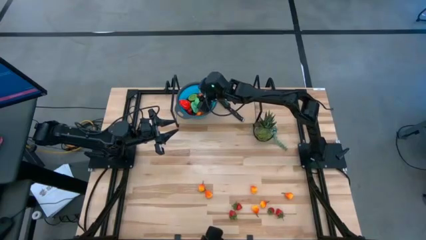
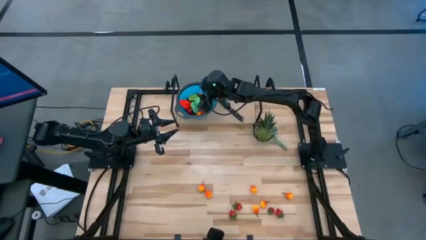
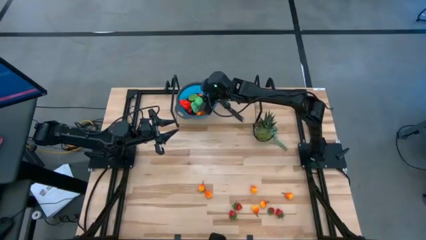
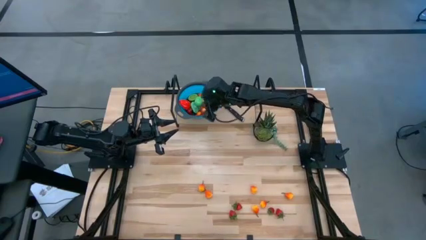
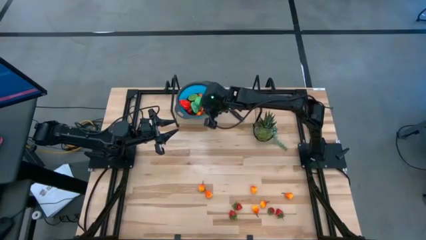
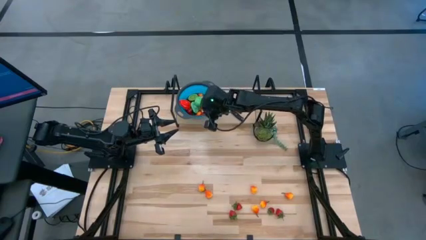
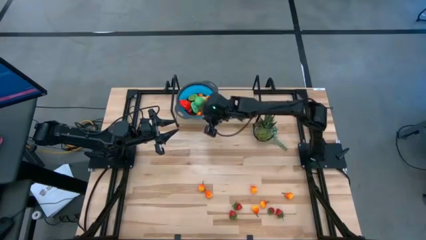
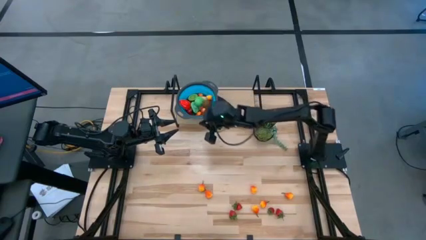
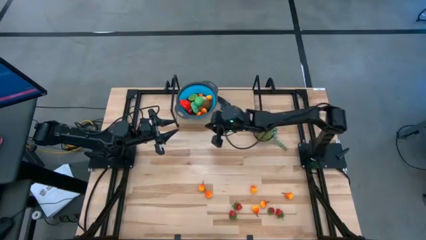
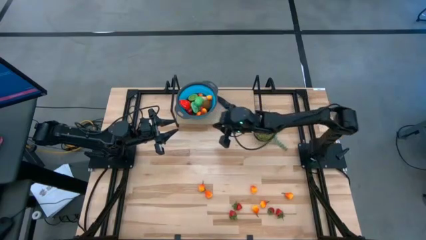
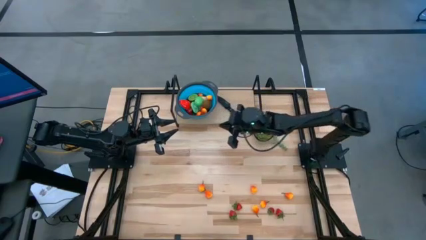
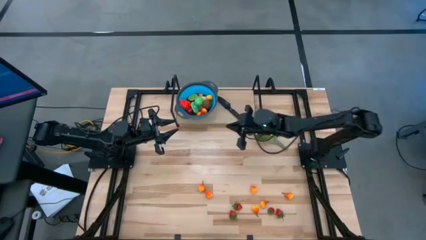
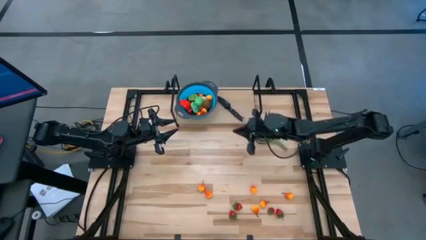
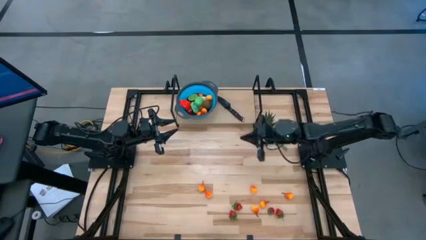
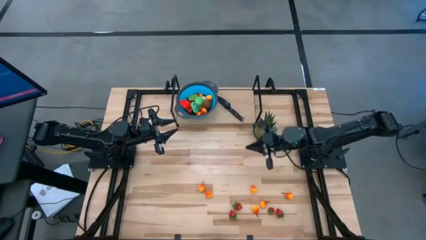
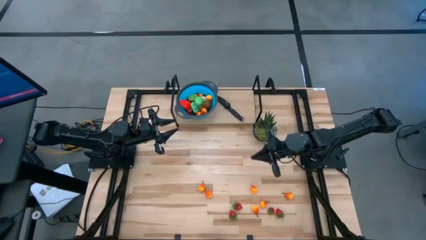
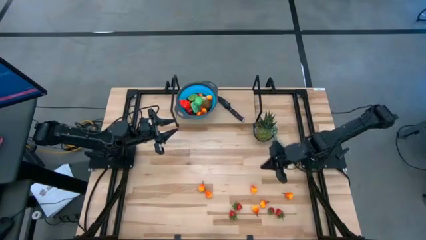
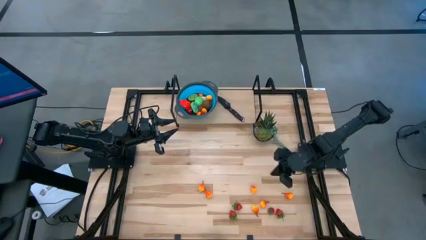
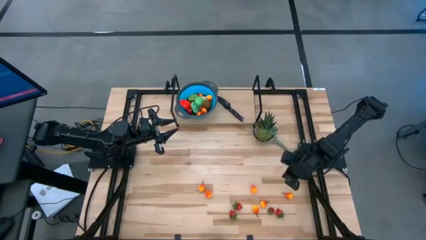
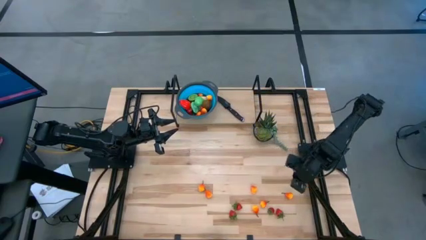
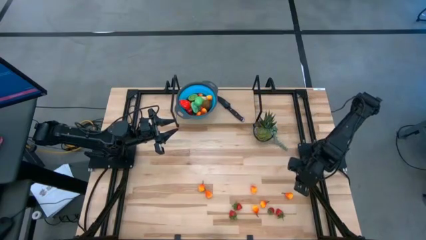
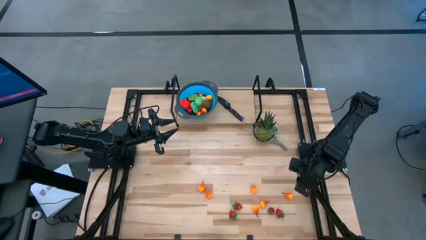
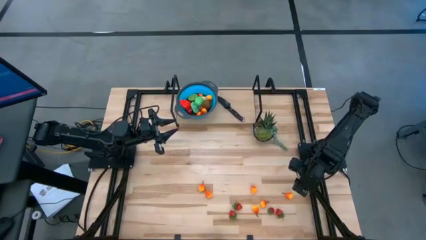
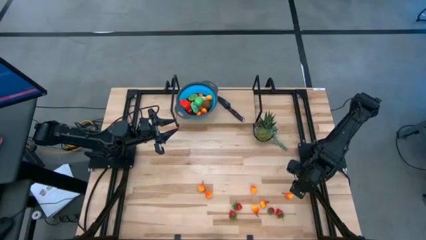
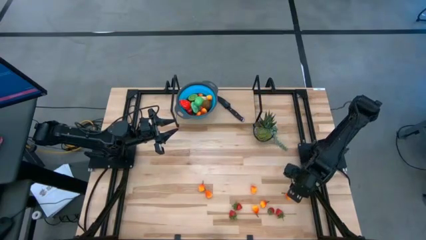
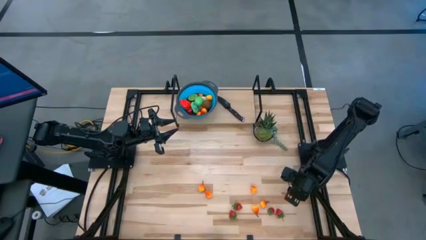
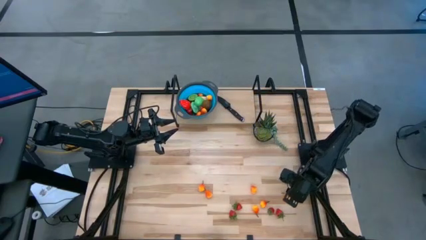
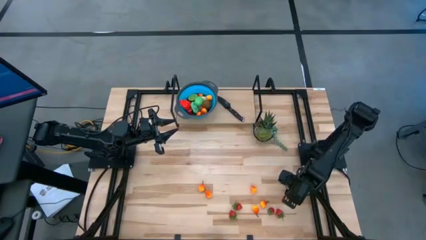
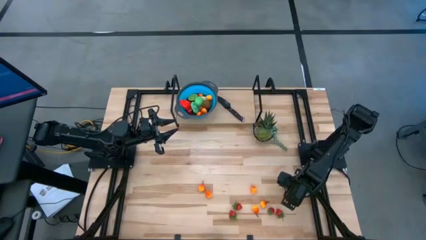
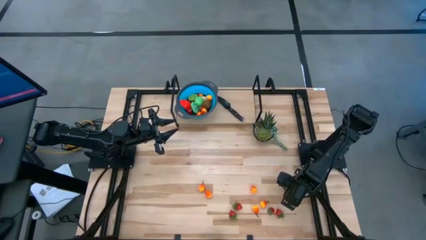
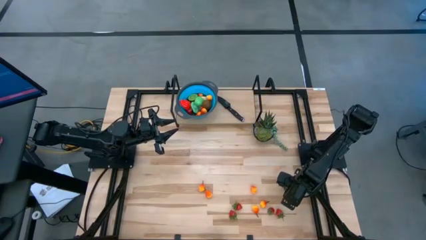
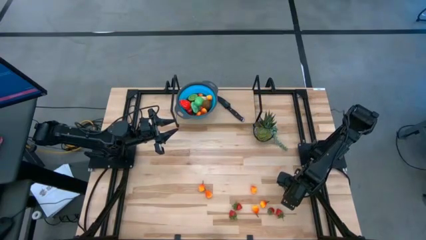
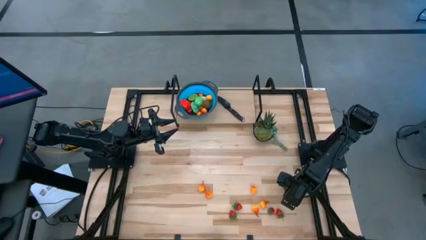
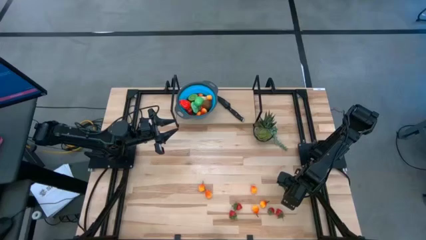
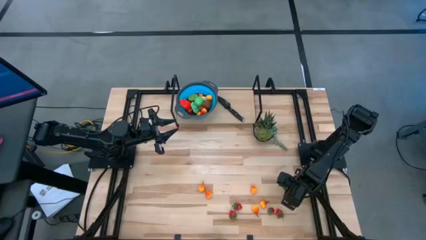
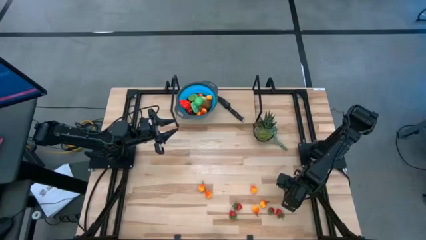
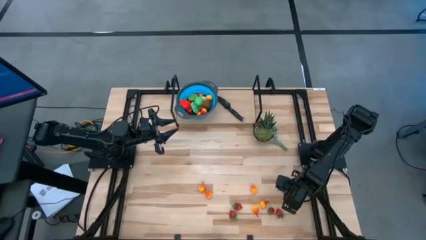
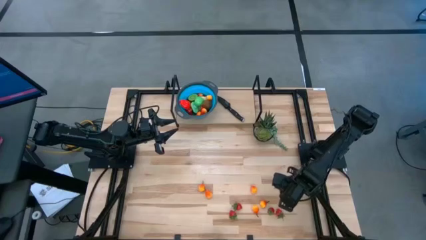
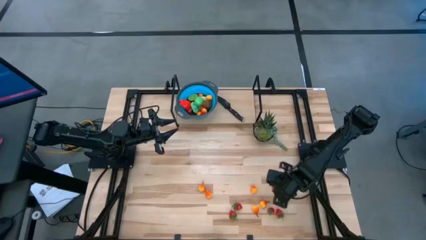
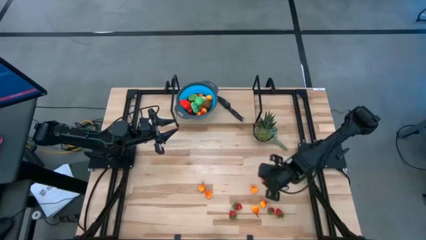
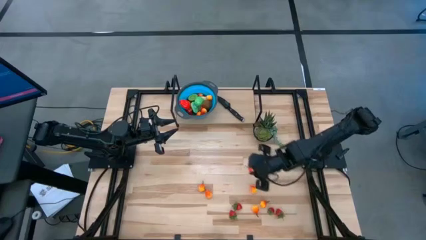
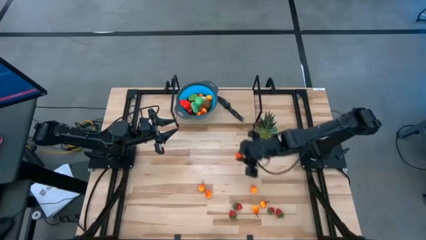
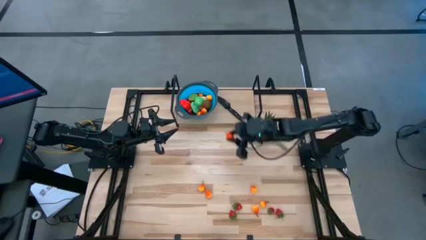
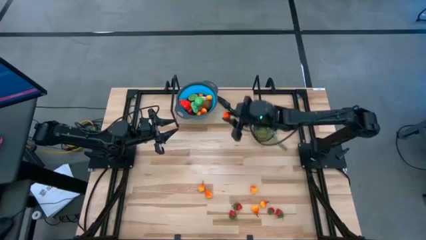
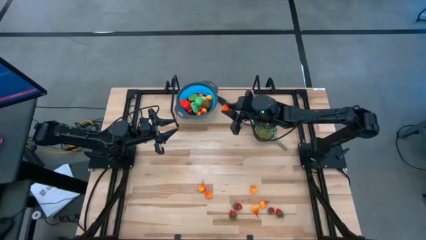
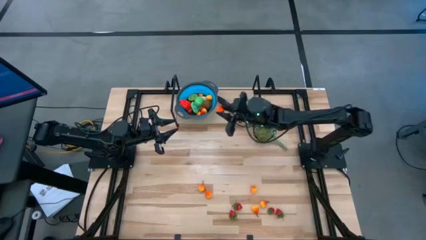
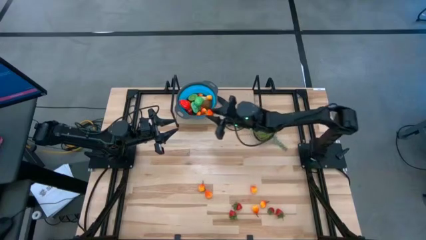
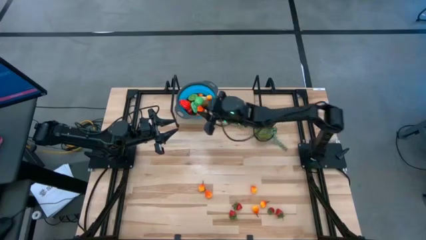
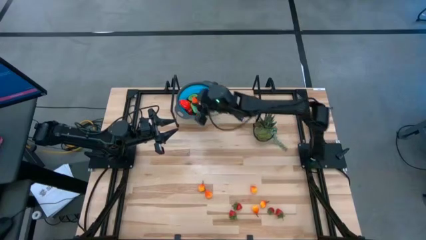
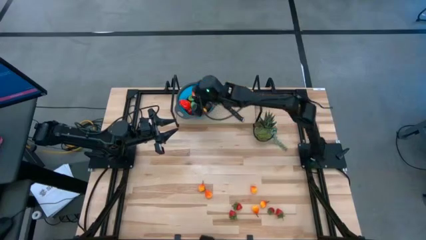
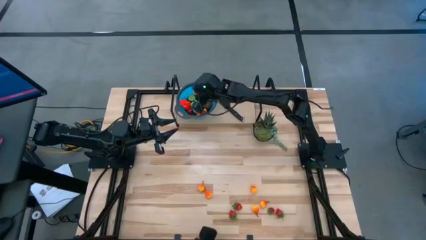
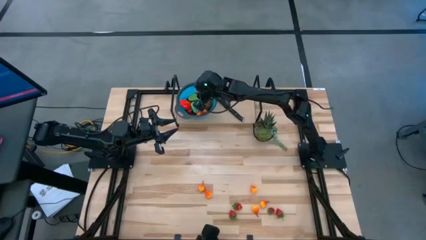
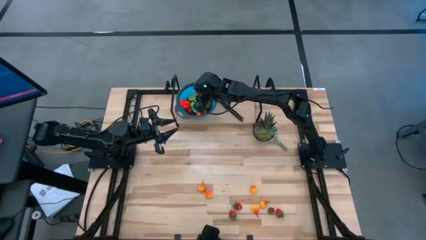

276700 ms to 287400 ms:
Task: Pick & Place Fruit
Put the pear into the basket

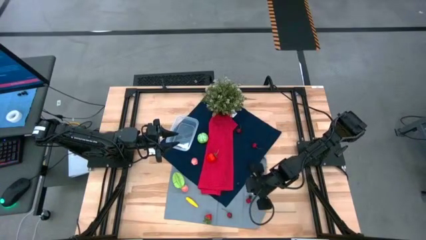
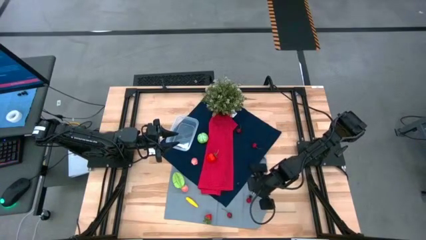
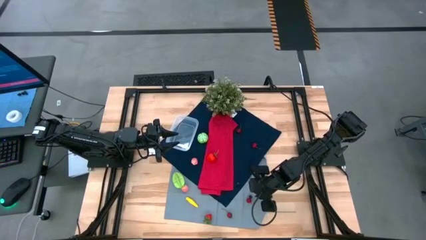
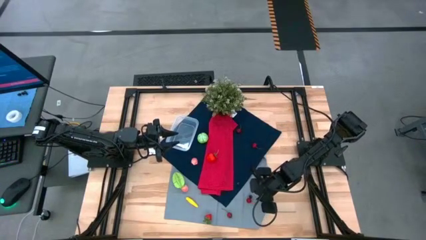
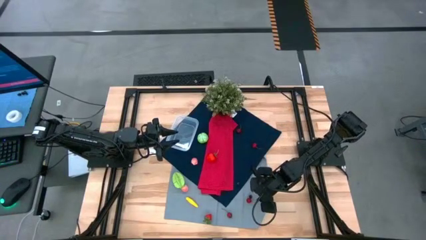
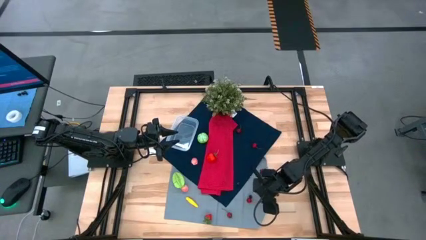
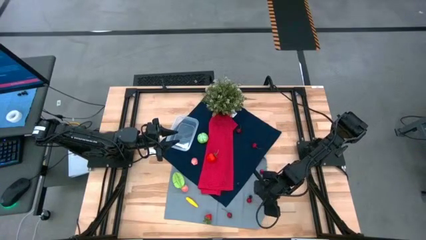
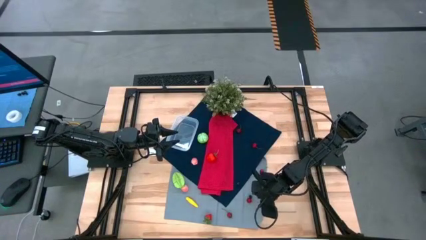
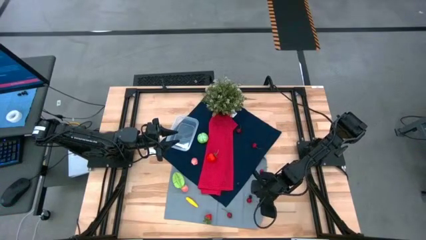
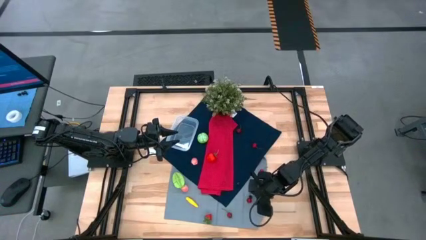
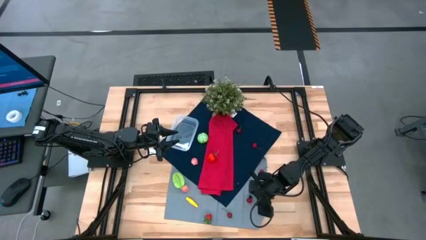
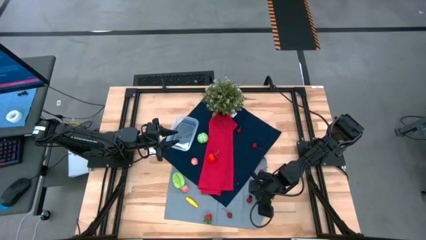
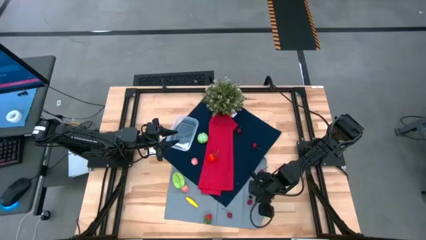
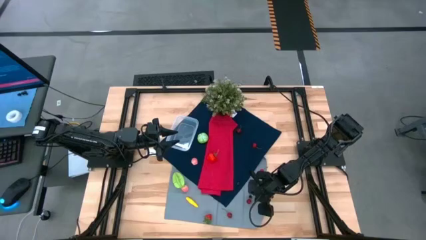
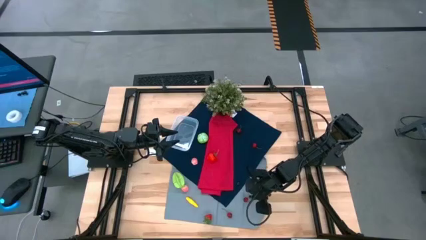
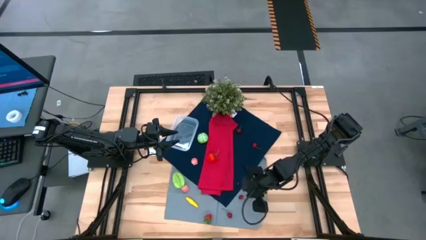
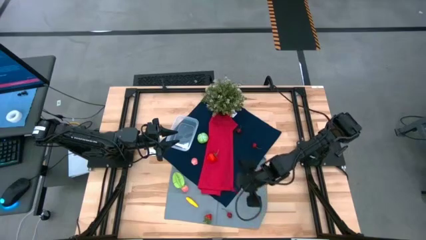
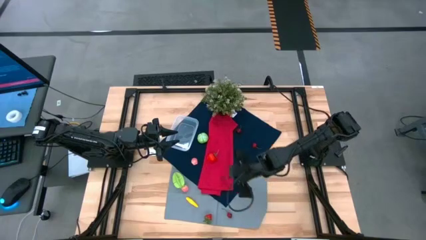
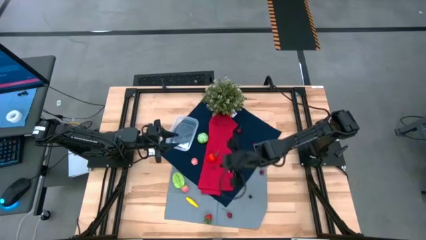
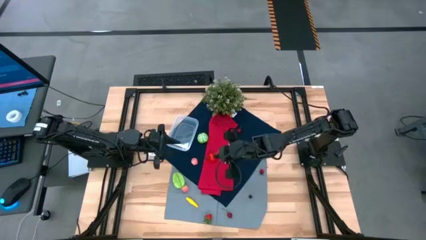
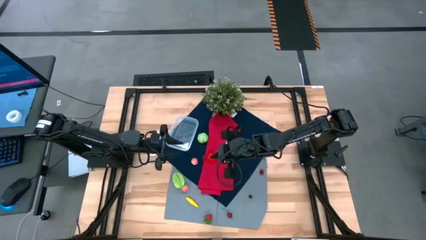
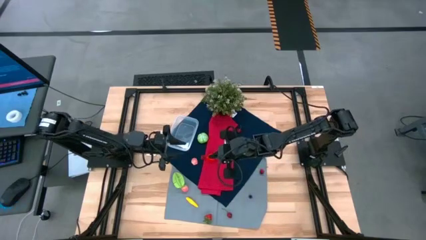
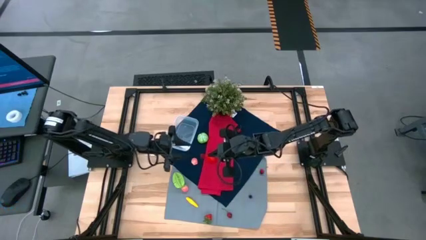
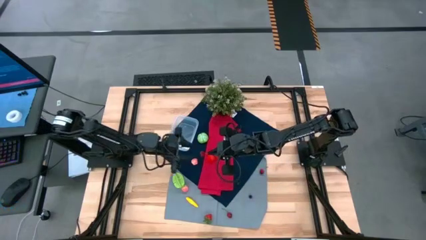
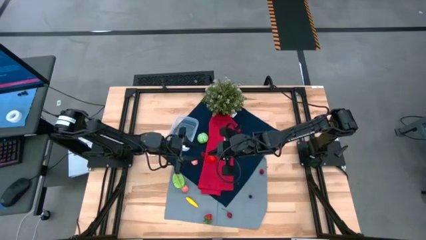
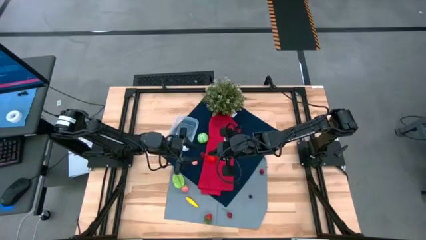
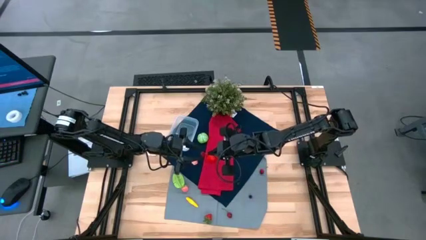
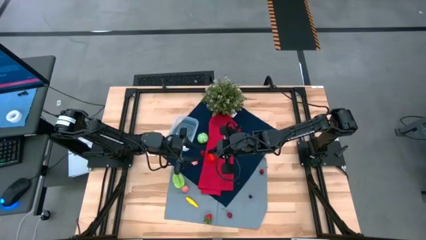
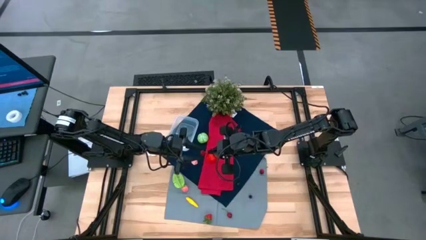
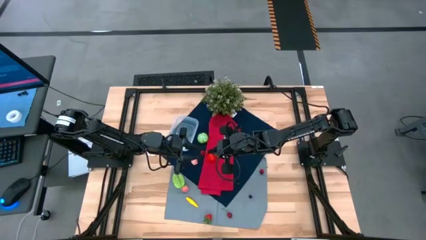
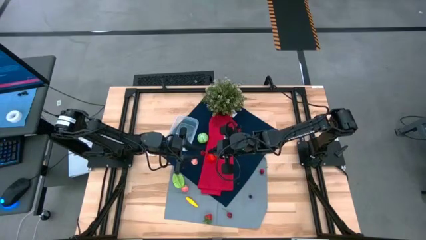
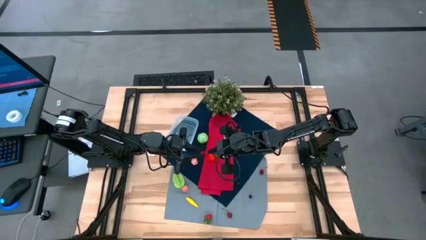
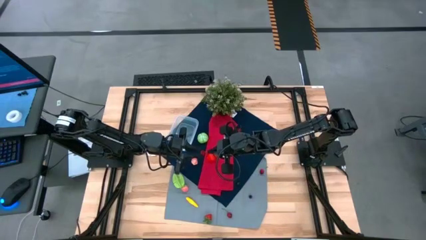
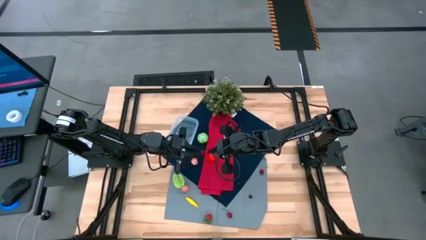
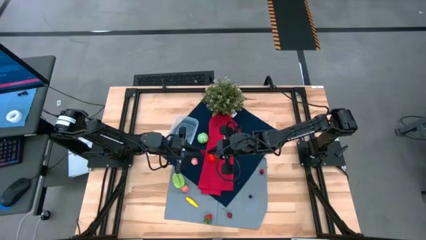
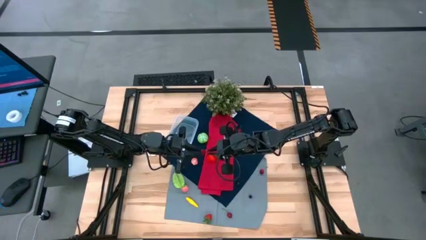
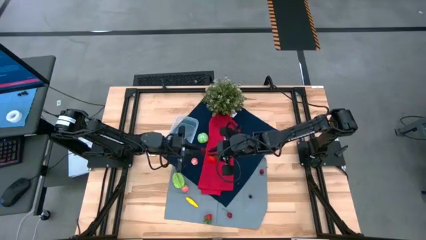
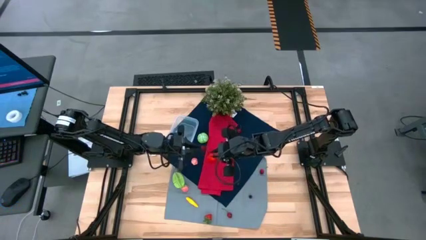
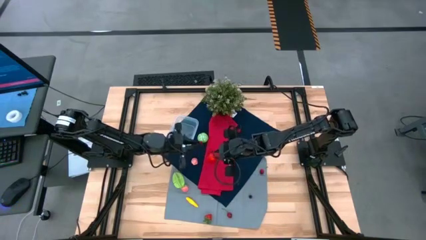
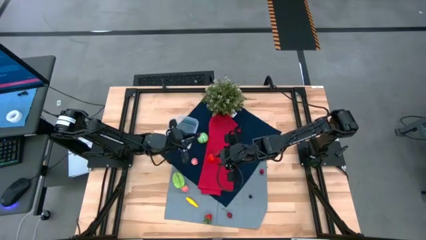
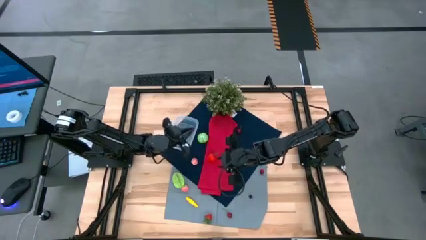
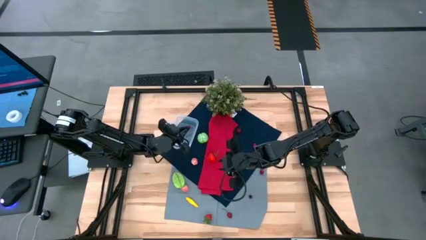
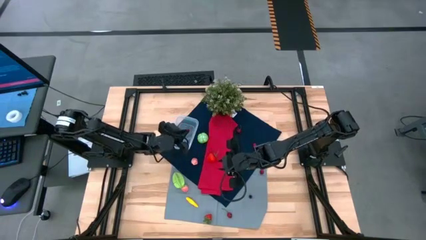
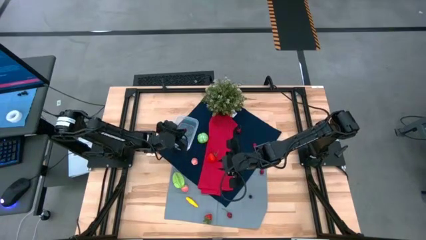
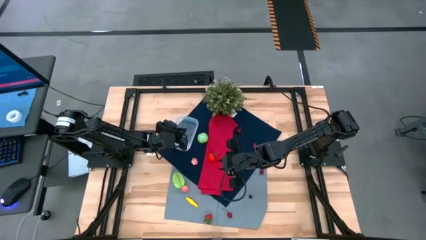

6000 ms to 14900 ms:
Task: Pick and placing Produce into tupperware
Put the red cherry into the transparent bin
